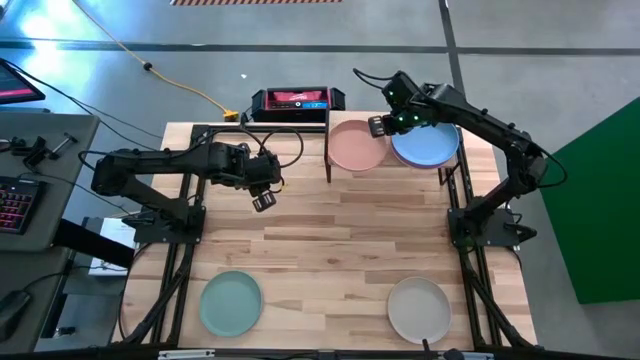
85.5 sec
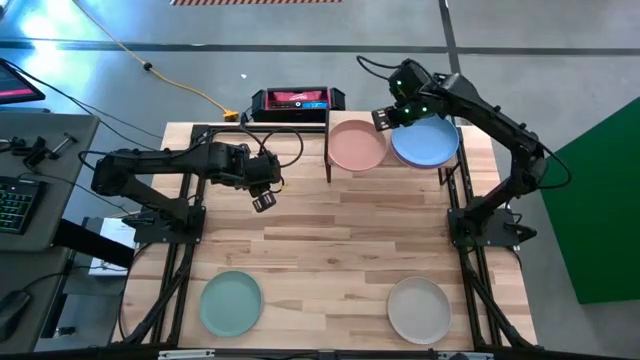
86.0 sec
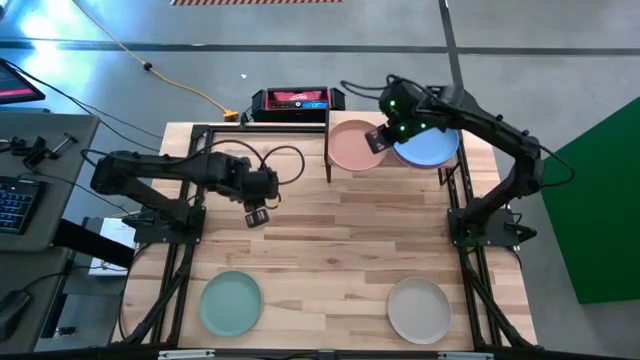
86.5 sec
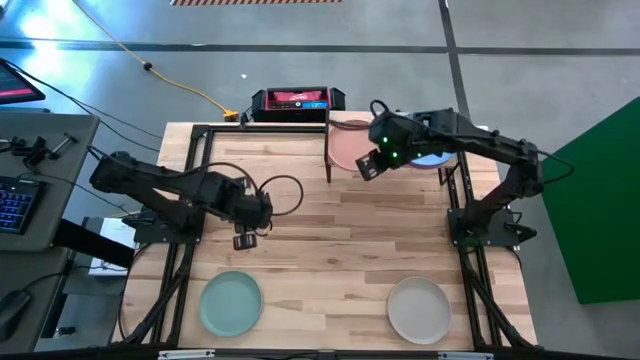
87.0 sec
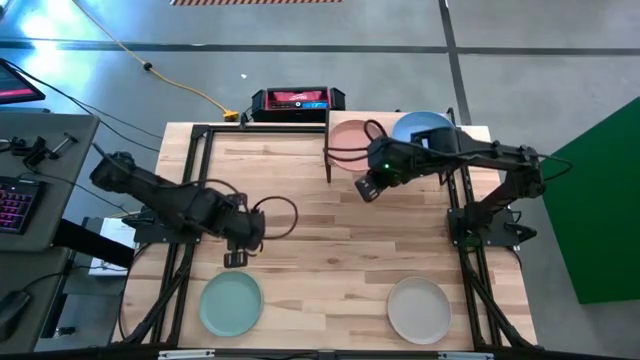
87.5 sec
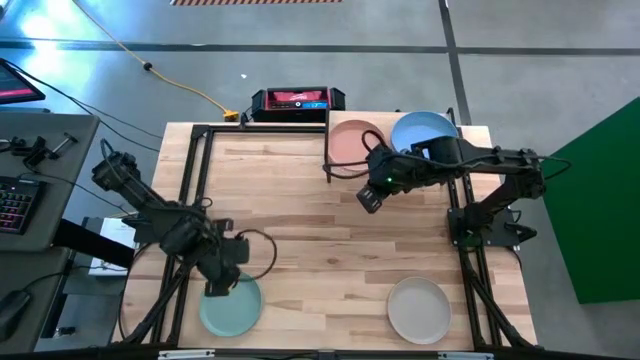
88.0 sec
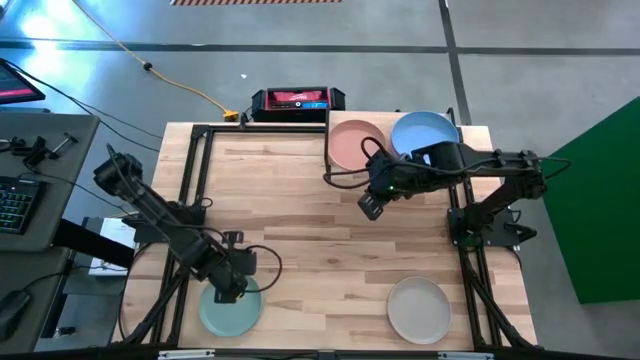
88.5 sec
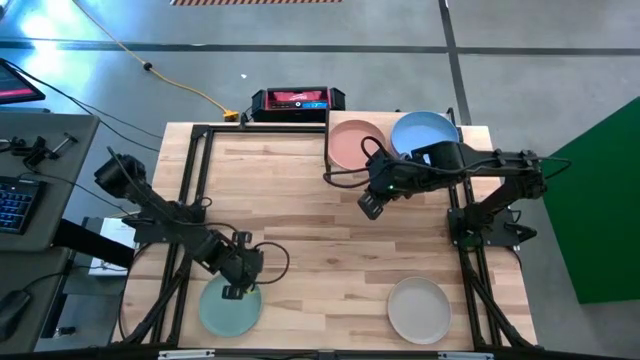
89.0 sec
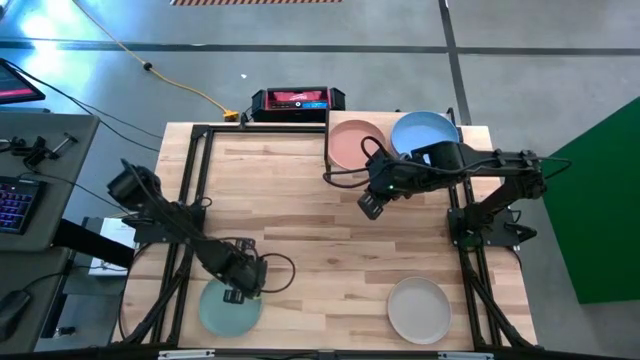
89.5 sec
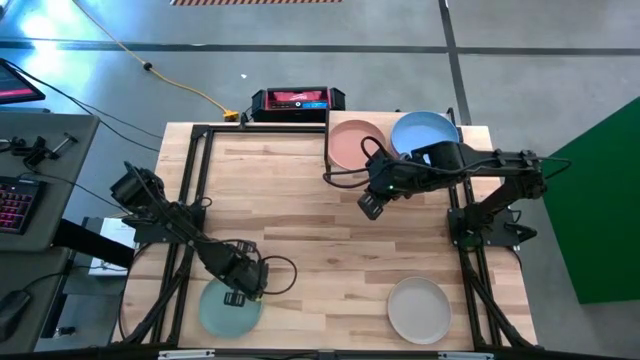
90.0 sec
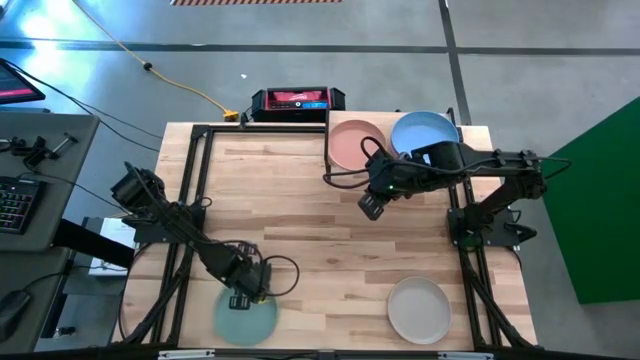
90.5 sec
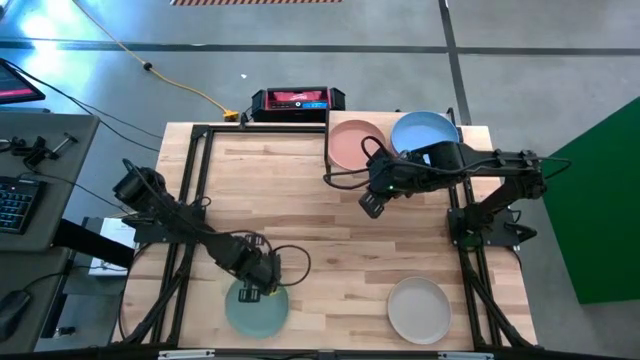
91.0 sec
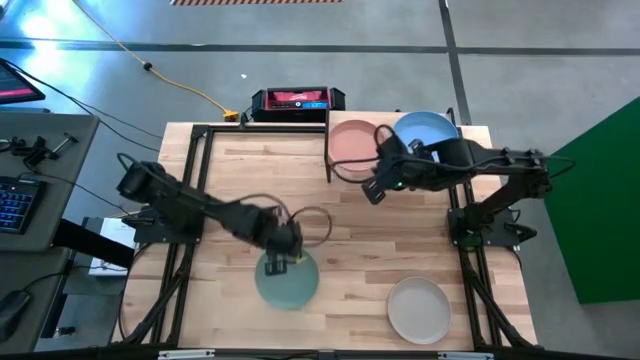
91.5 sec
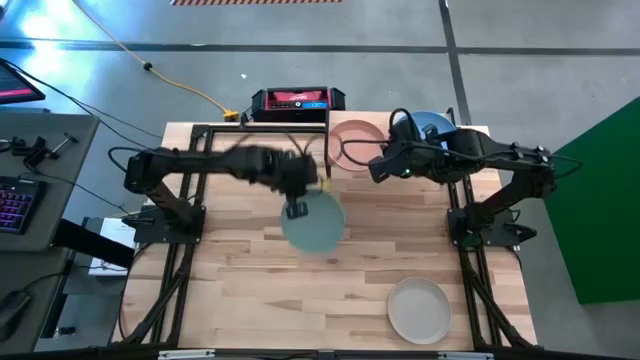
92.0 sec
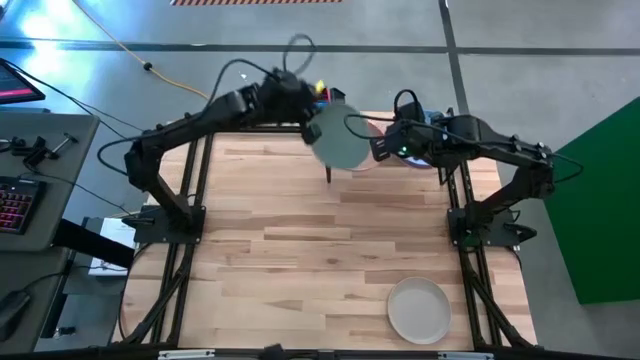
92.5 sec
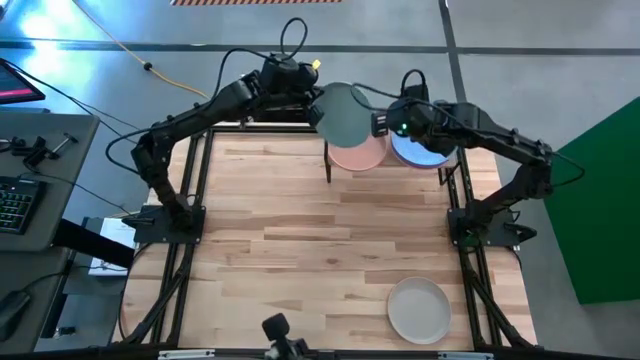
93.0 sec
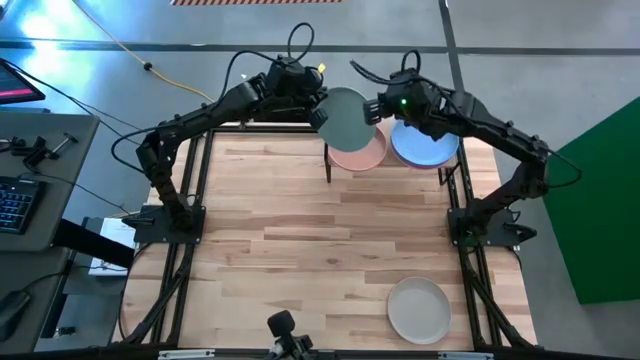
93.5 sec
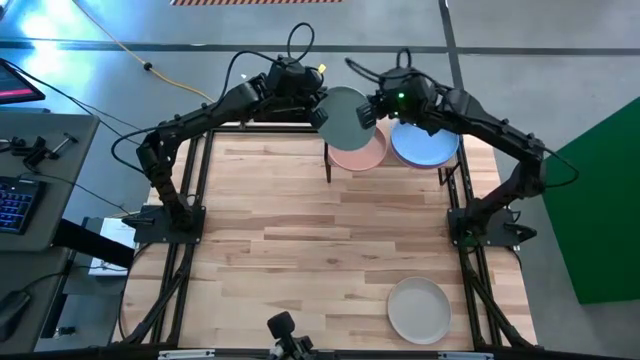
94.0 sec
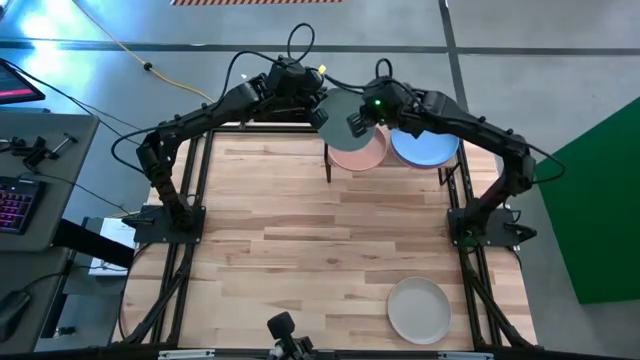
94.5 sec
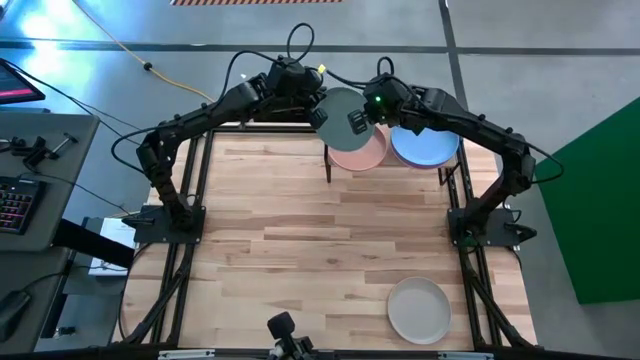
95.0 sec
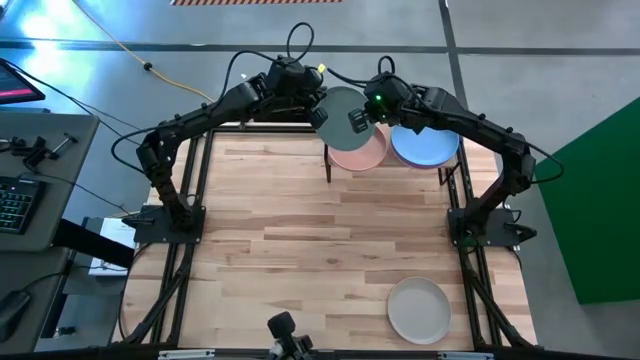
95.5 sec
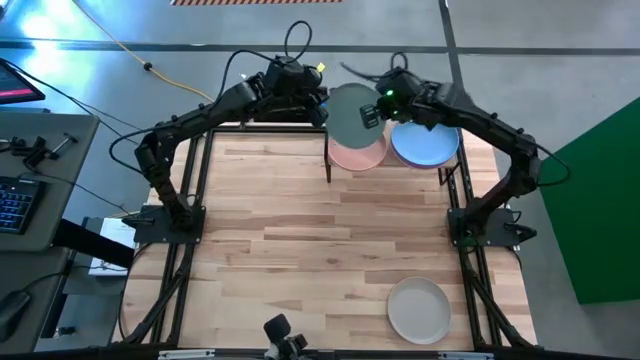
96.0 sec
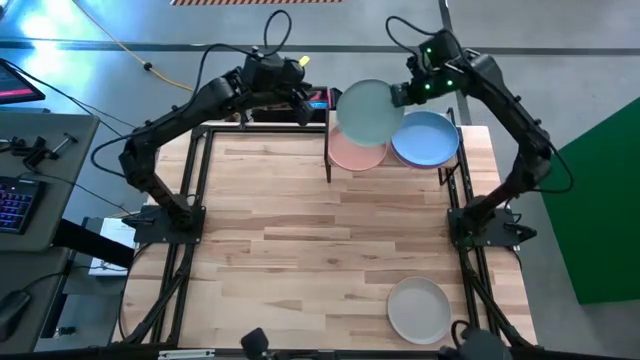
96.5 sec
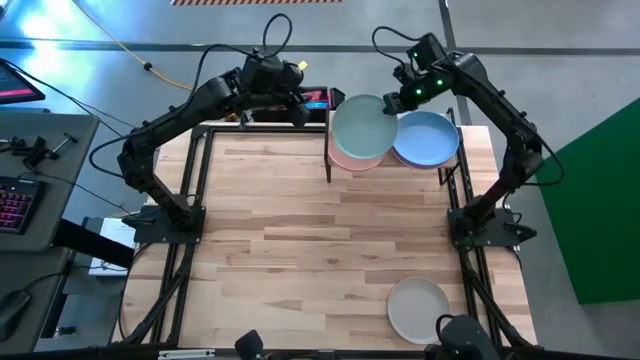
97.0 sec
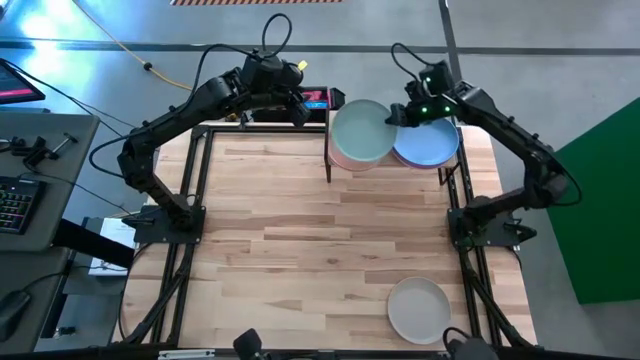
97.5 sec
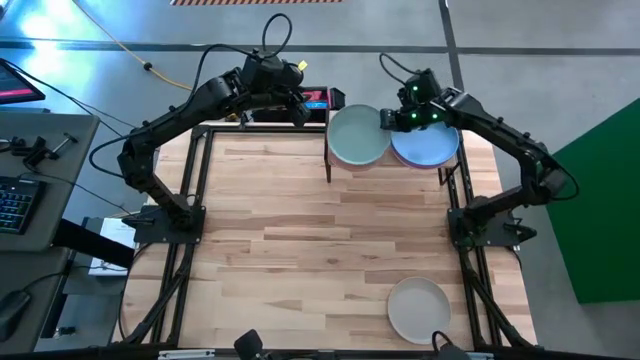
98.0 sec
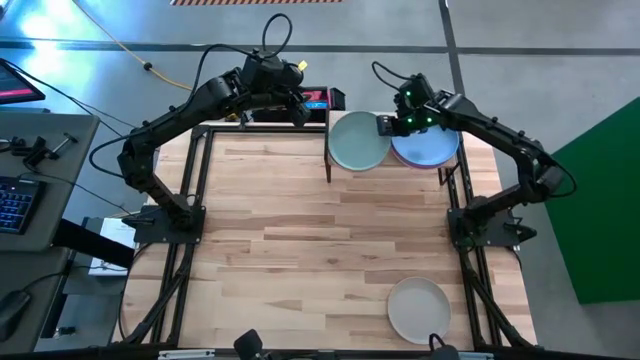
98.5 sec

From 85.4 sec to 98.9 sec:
Task: Place and stack plates onto a shelf
Stack the light blue plate on top of the brown plate on the shelf

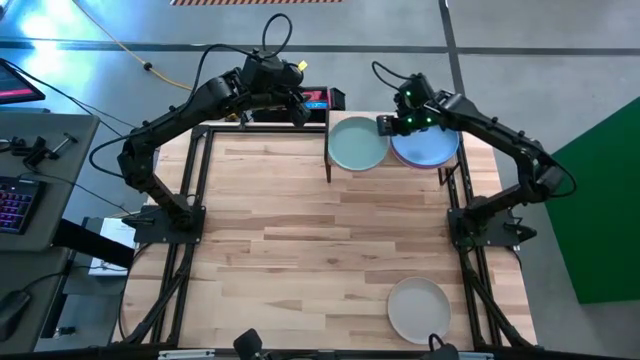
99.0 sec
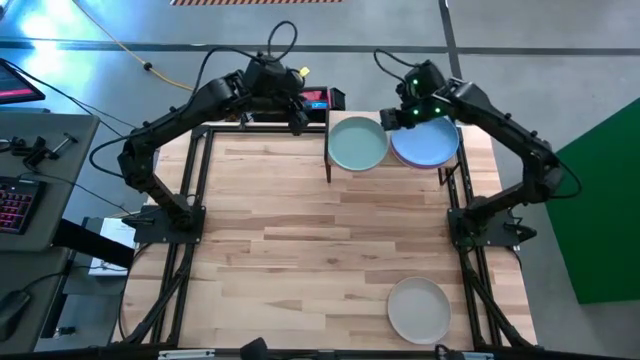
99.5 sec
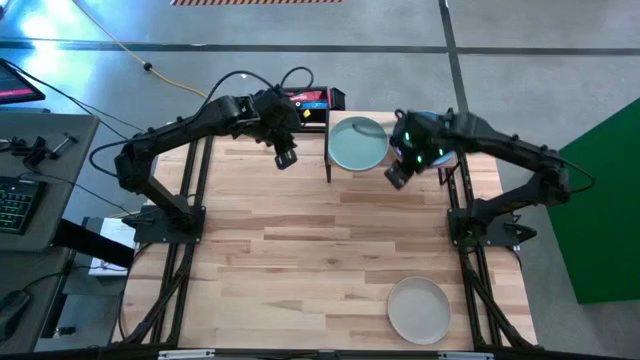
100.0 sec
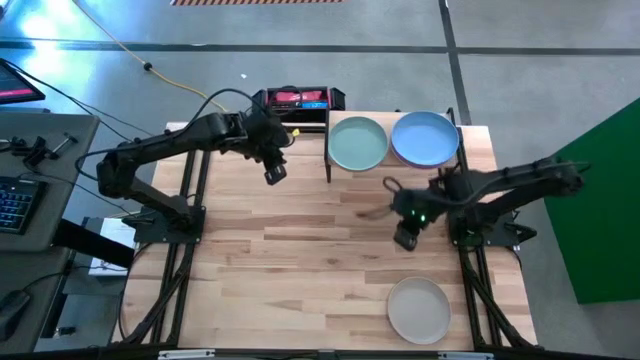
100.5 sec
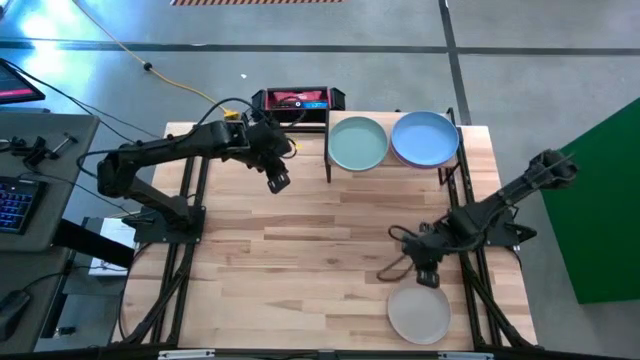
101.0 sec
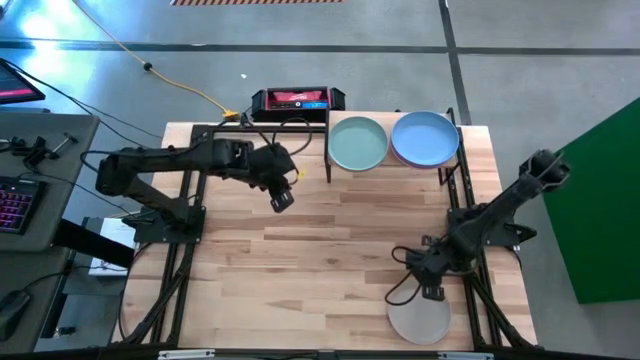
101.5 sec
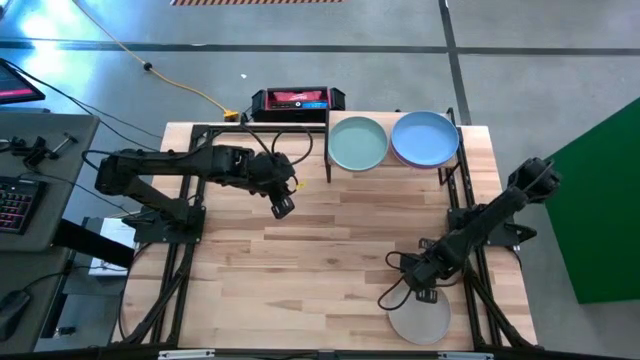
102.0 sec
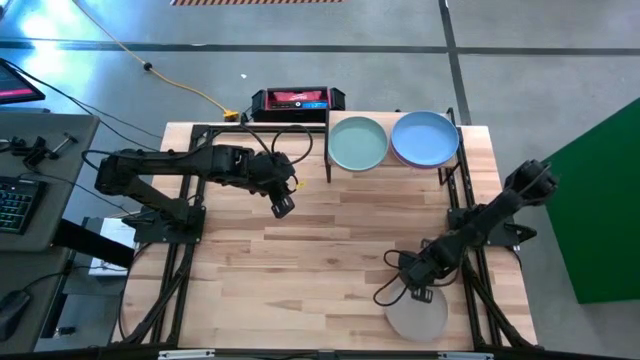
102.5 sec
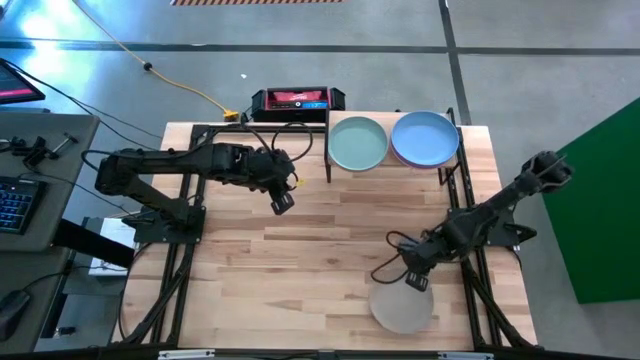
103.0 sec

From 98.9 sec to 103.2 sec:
Stack the gray plate on top of the light blue plate on the shelf

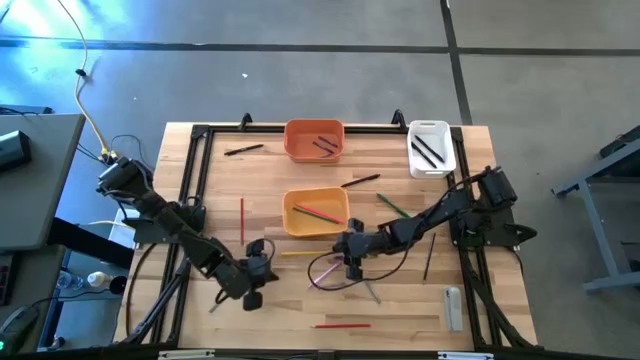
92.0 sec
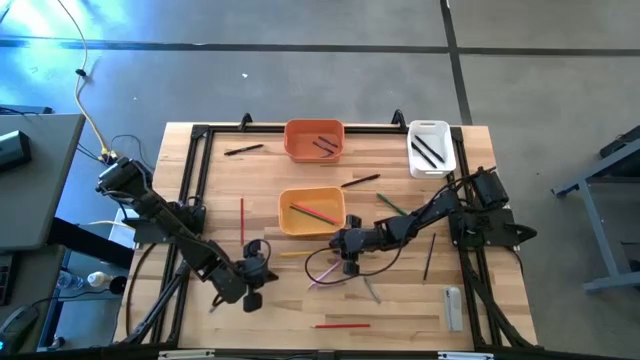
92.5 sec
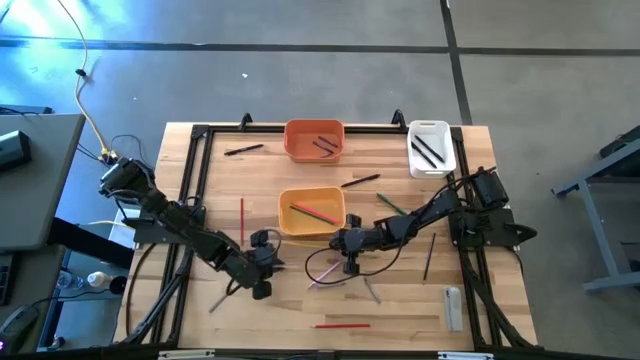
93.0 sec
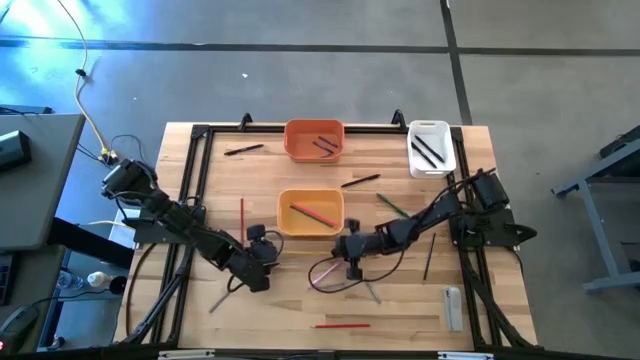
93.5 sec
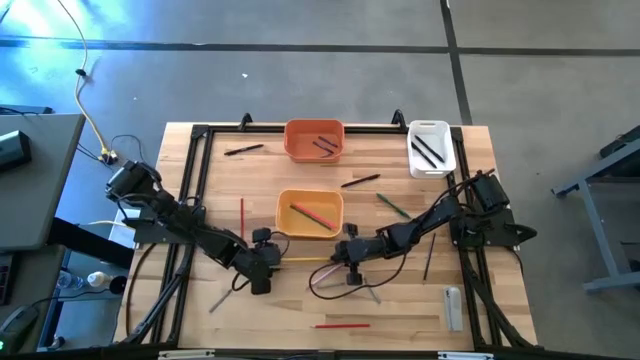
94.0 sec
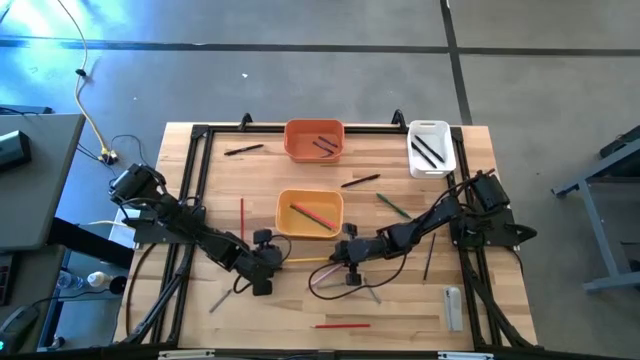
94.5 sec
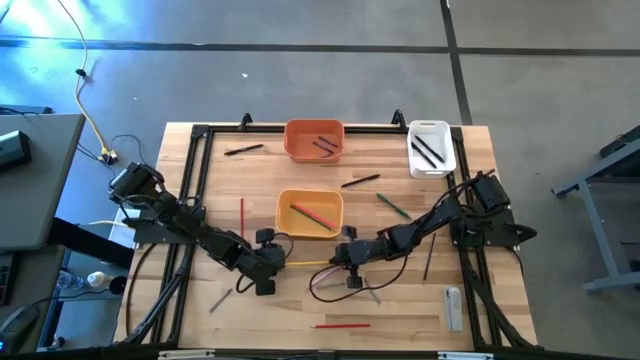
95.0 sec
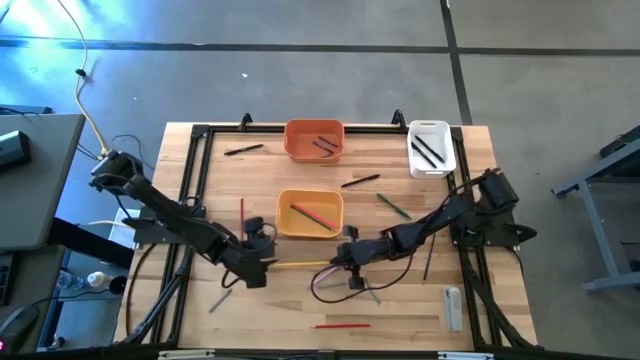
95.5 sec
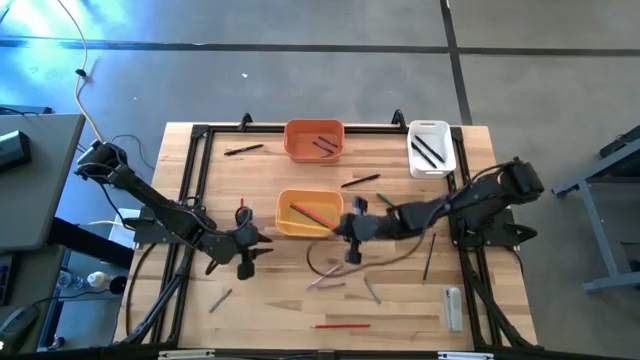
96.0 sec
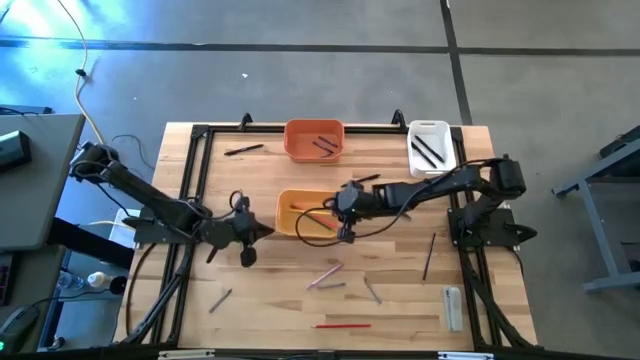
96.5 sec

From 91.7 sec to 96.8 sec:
Task: Sort crayons/erasers/pens/pencils in bins
Put the yellow pencil into the yellow bin
